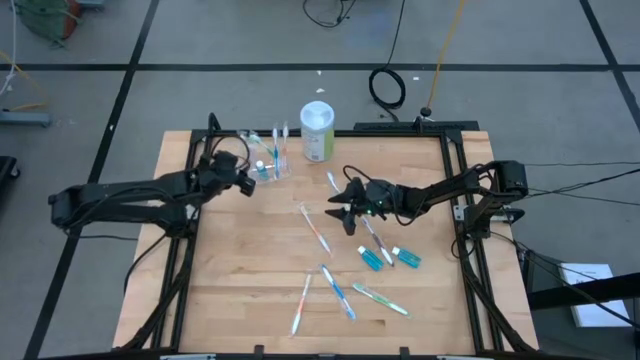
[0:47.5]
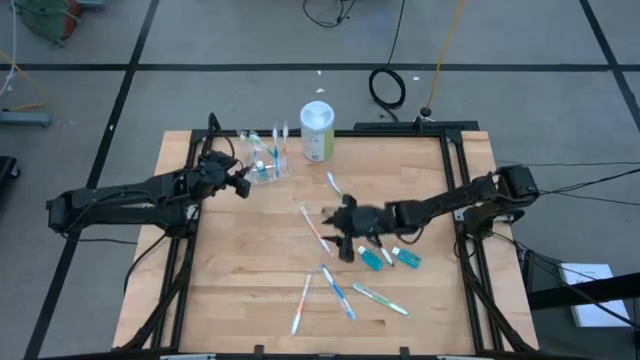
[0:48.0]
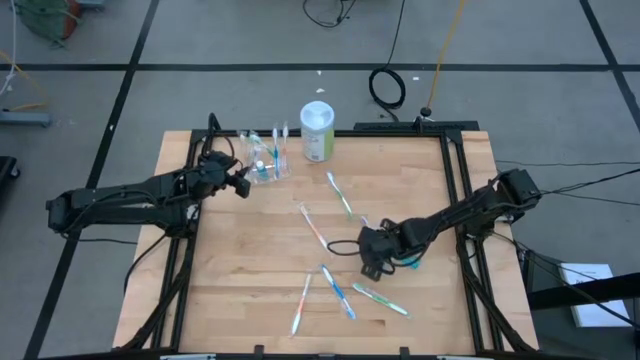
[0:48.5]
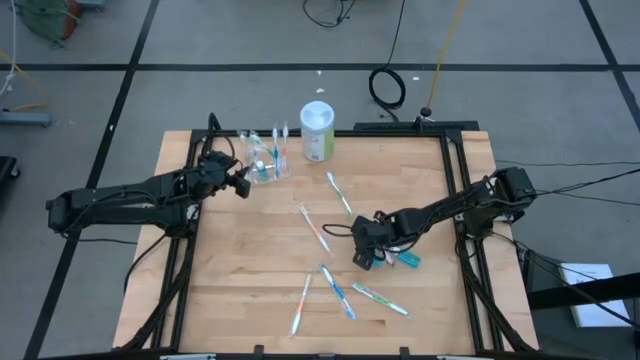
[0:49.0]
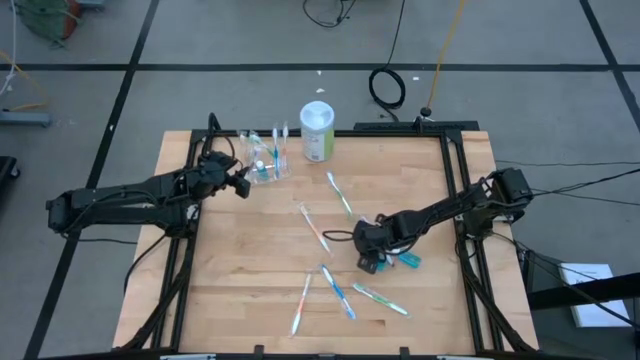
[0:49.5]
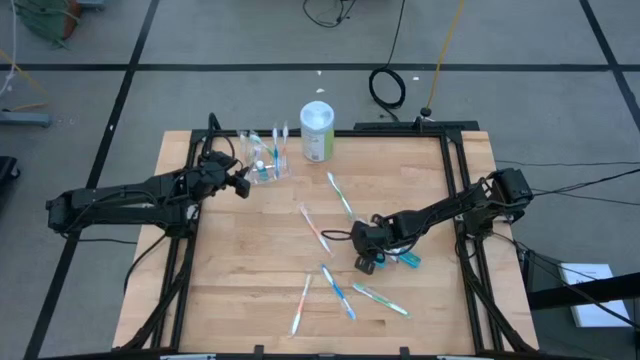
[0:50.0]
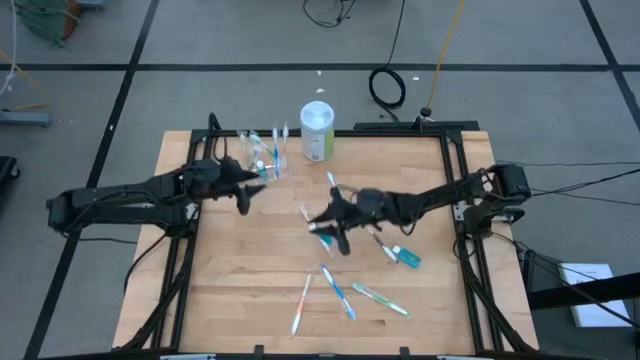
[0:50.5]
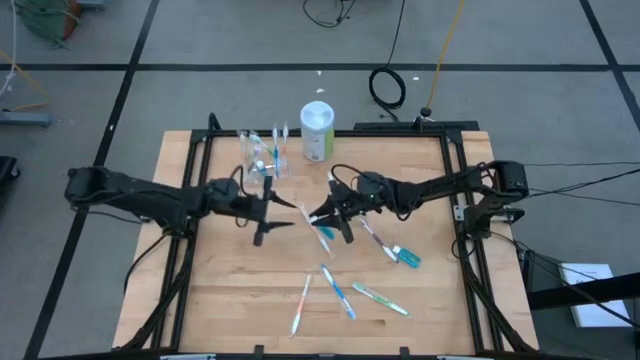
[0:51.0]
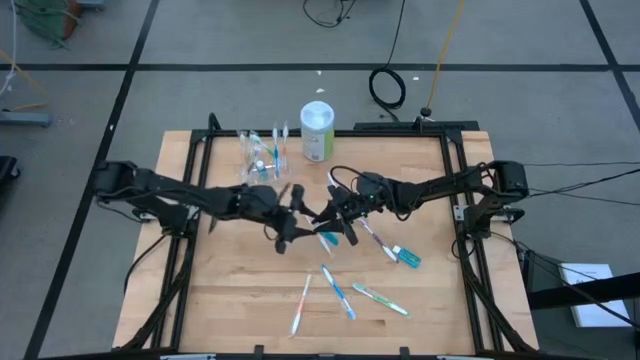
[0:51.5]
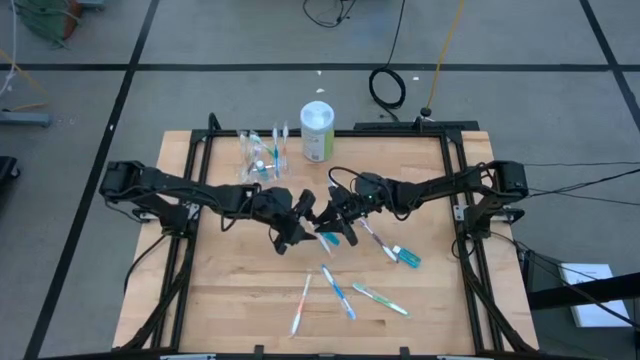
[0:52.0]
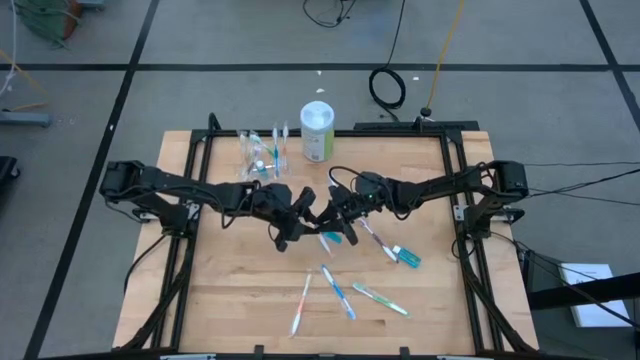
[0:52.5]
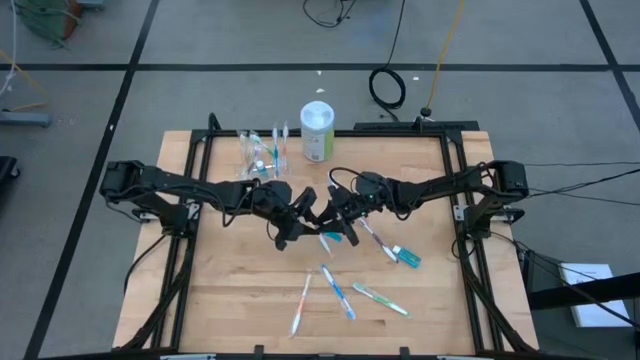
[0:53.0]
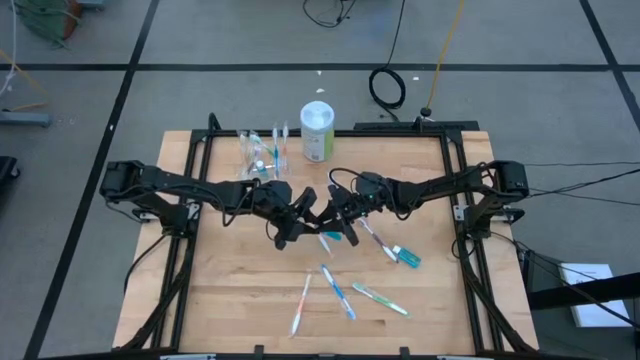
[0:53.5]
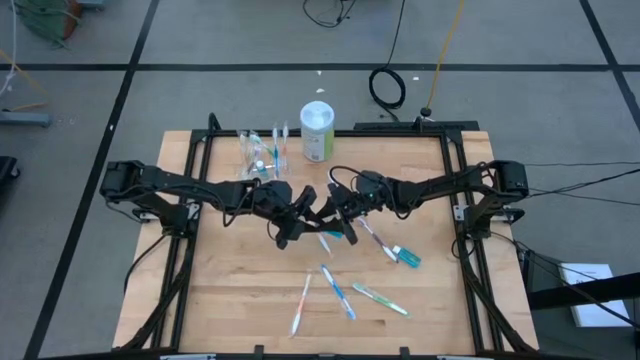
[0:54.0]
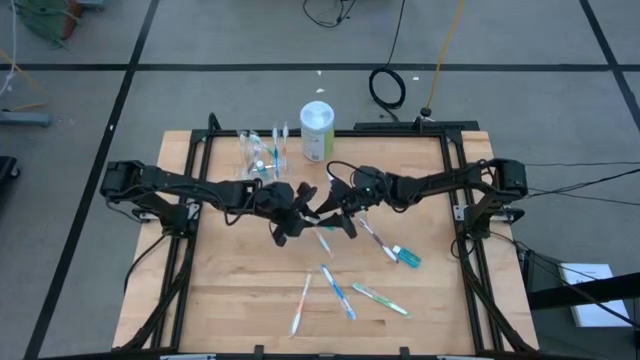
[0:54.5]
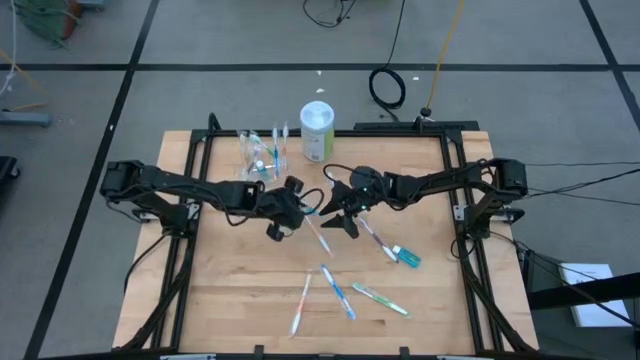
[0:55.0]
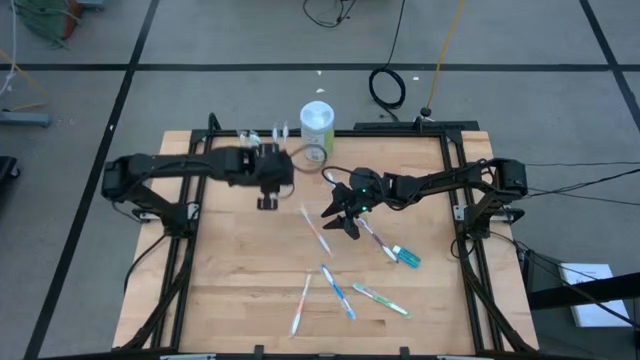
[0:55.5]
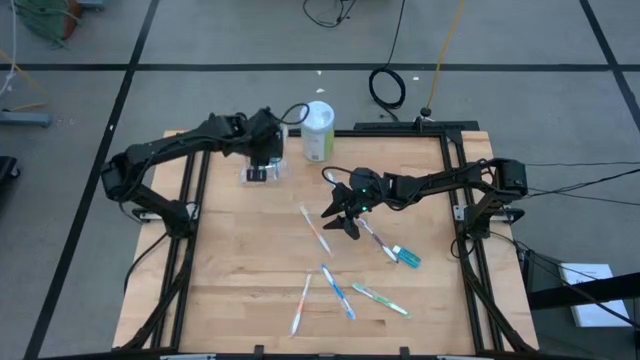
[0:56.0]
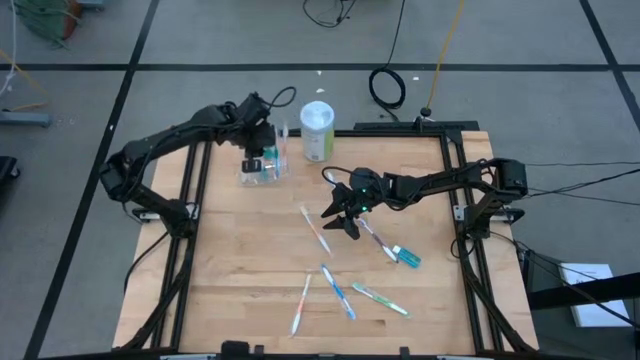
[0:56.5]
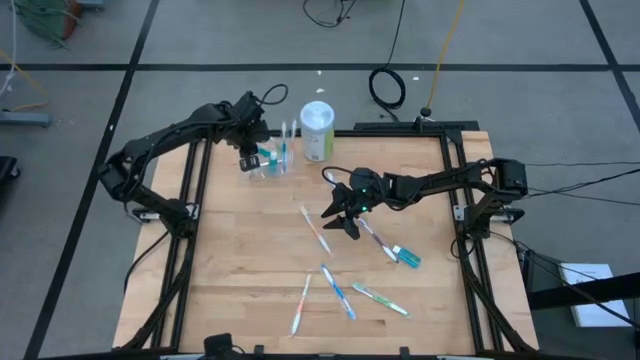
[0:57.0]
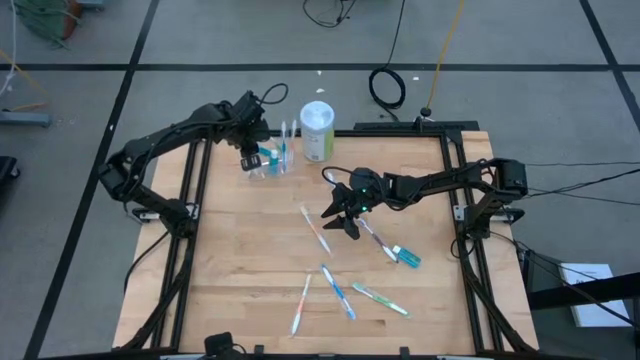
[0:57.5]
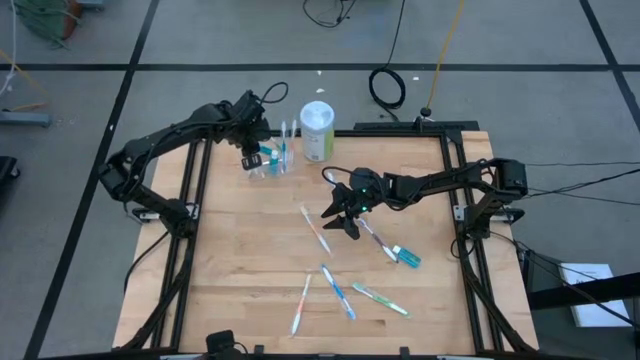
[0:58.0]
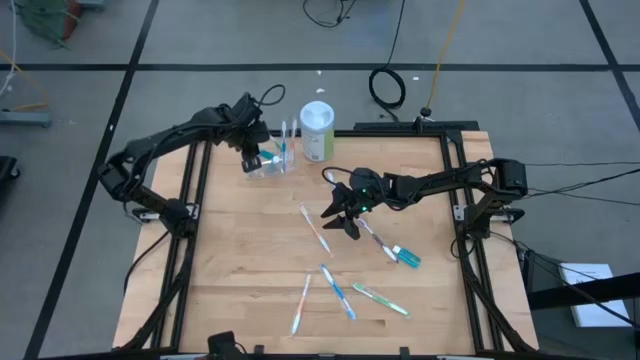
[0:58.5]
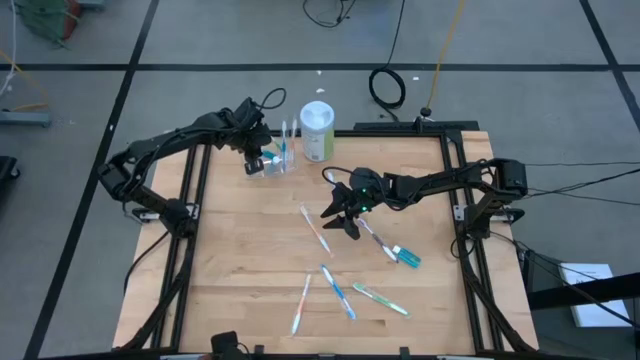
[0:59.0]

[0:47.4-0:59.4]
Task: Pick & Place toothbrushing station
Put the left mouthwash into the transparent organizer

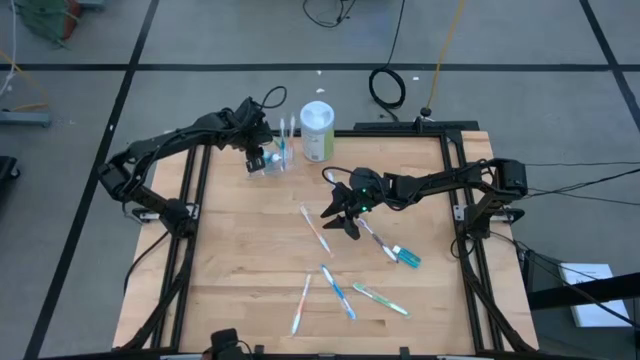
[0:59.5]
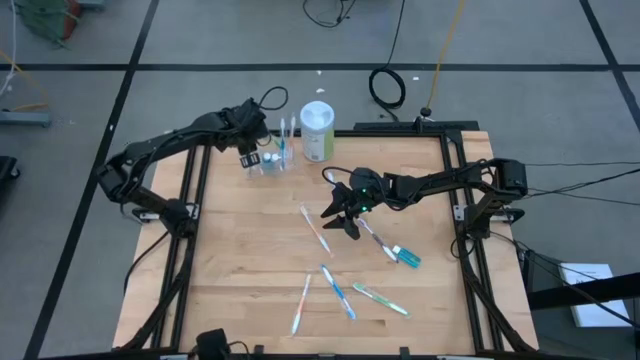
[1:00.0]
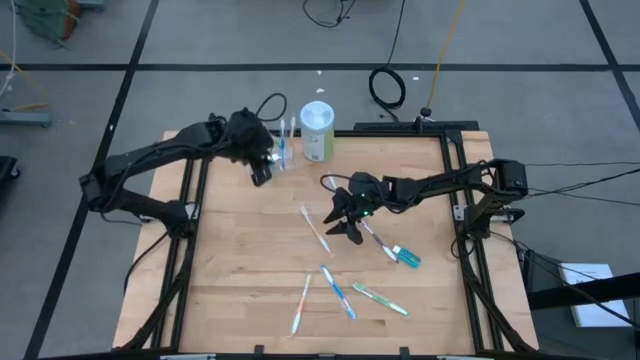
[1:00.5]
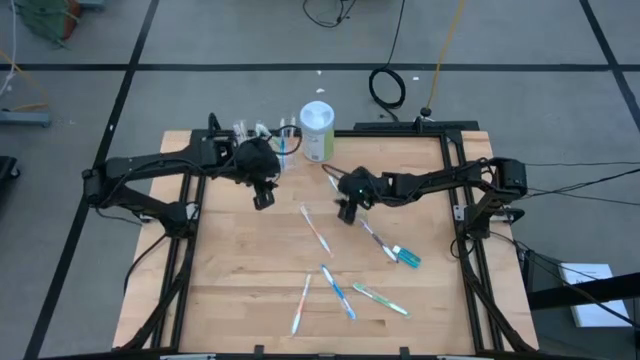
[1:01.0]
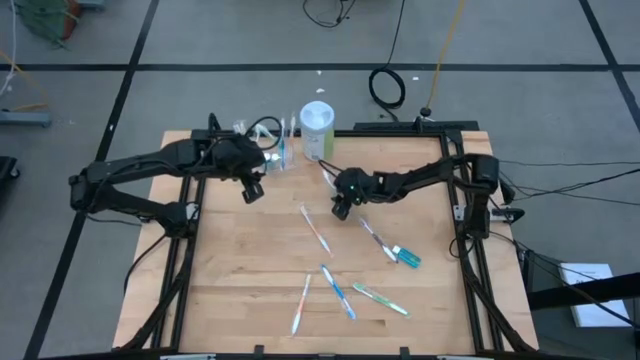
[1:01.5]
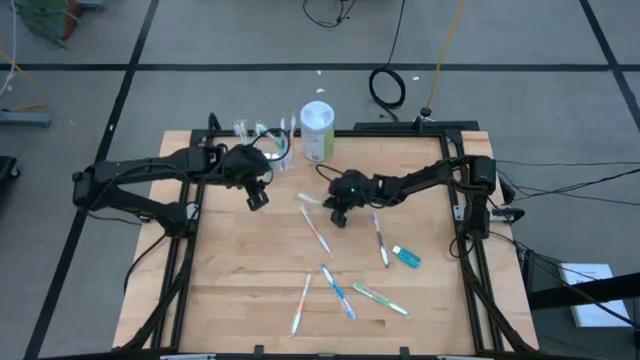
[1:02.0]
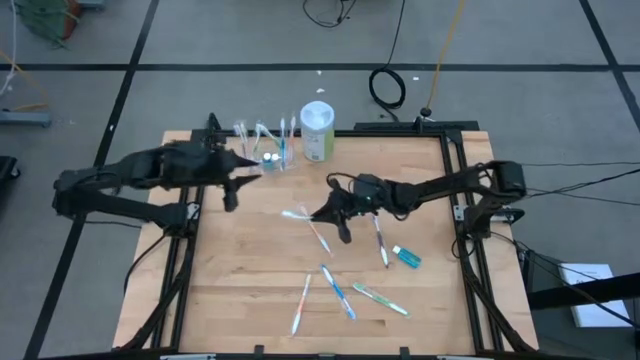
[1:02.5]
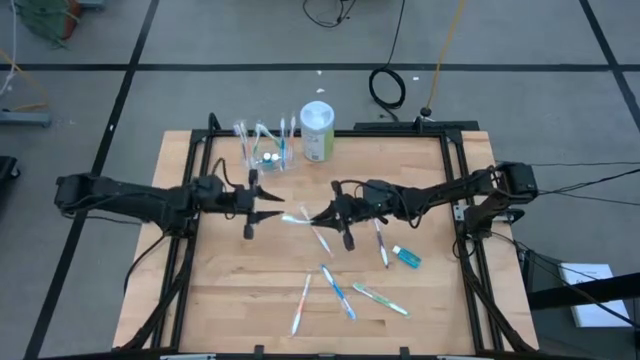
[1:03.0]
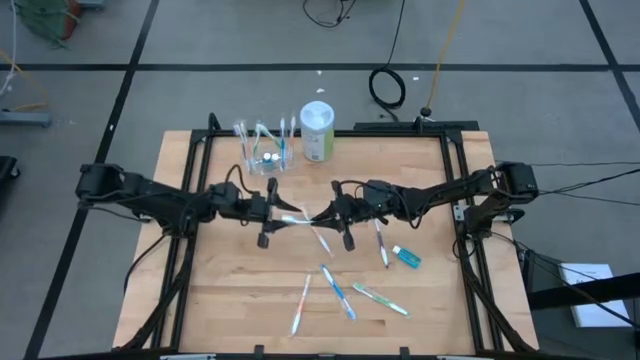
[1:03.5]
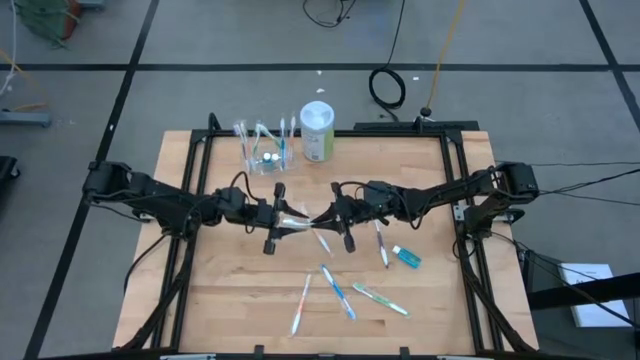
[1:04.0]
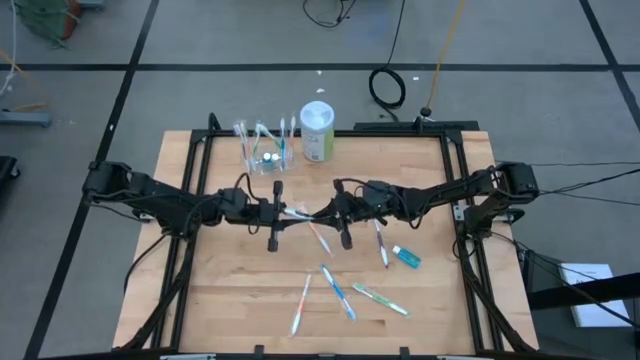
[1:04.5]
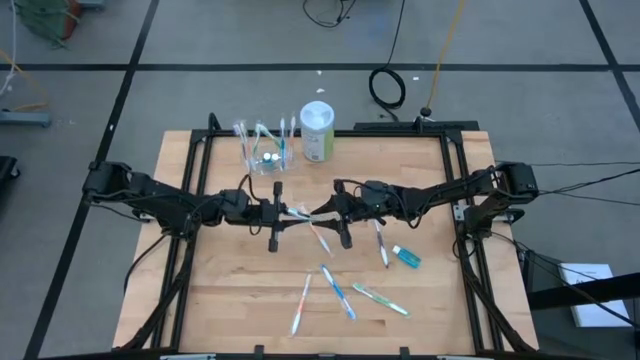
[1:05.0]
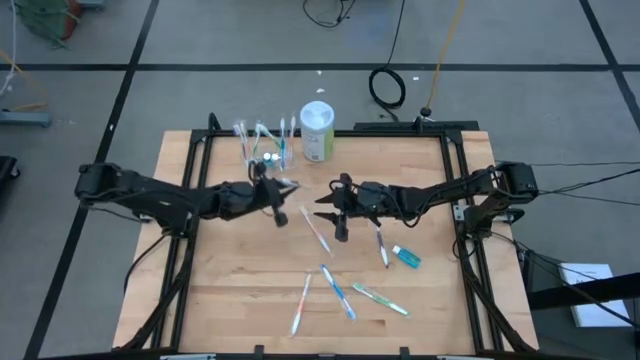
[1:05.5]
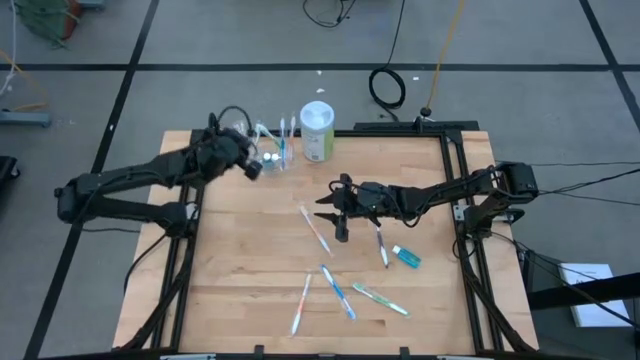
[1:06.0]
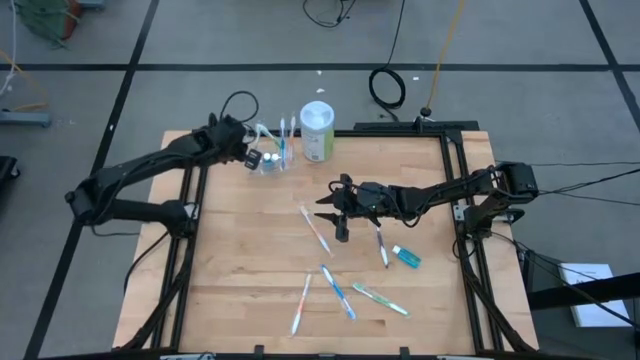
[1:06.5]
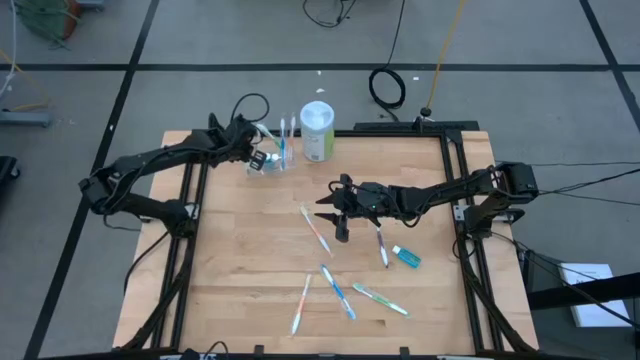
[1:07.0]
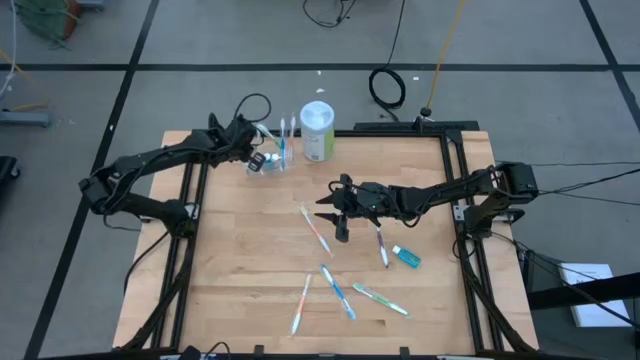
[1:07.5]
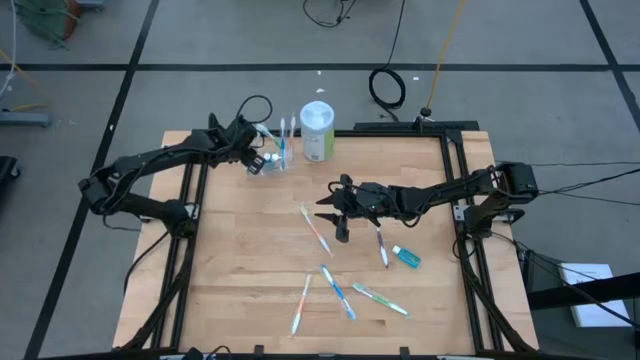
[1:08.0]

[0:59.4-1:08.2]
Put the top green toothbrush into the transparent organizer
